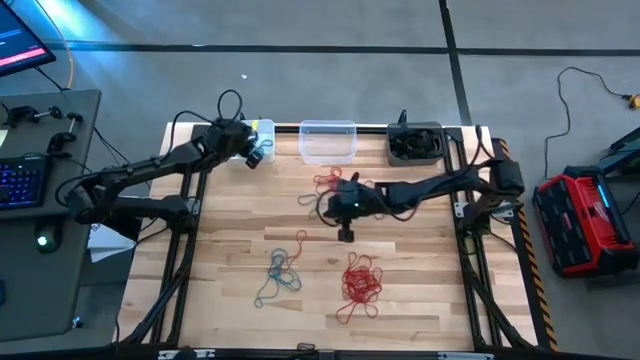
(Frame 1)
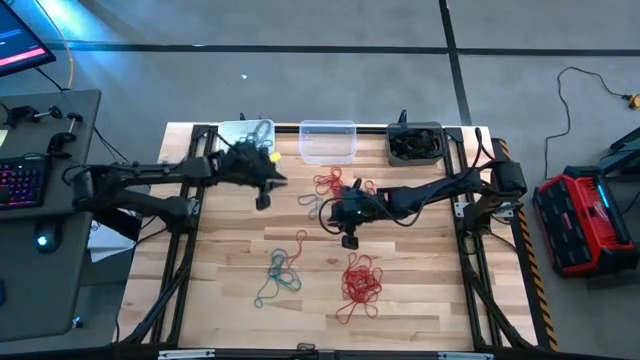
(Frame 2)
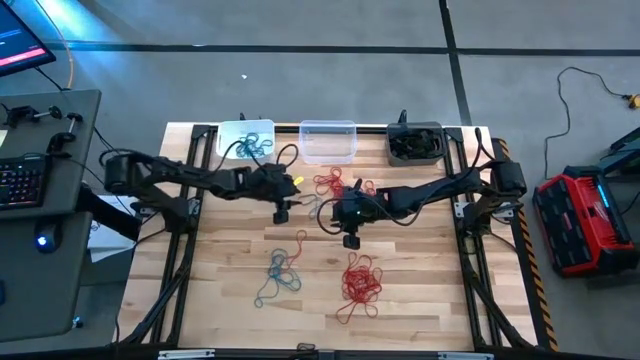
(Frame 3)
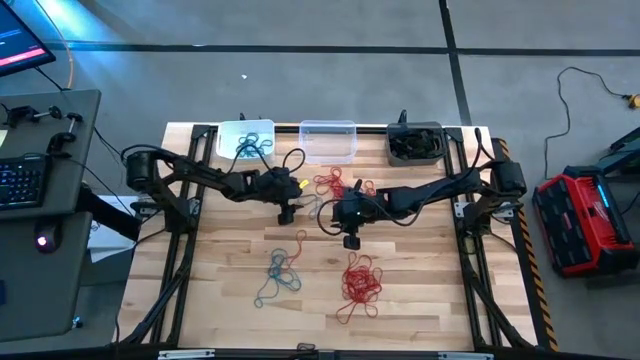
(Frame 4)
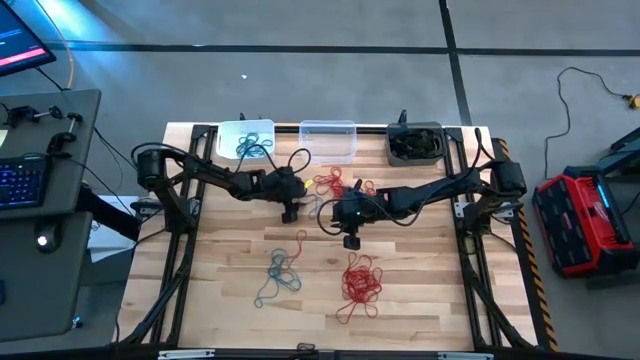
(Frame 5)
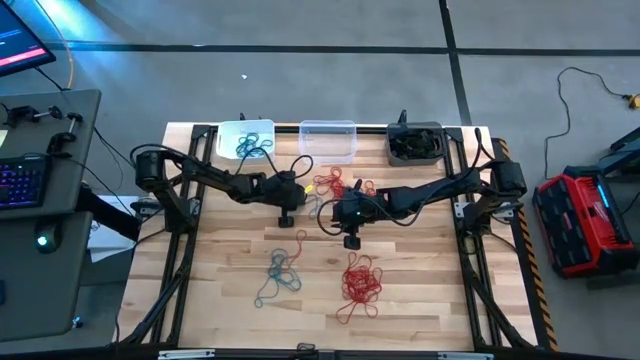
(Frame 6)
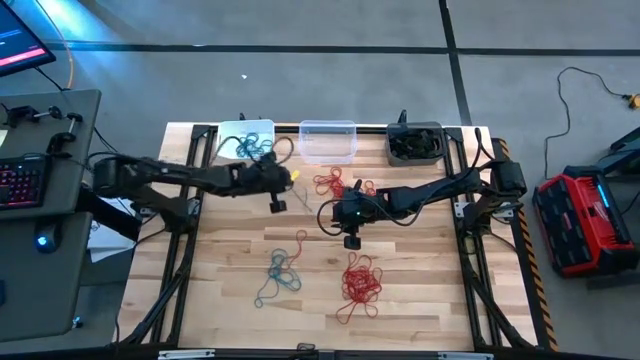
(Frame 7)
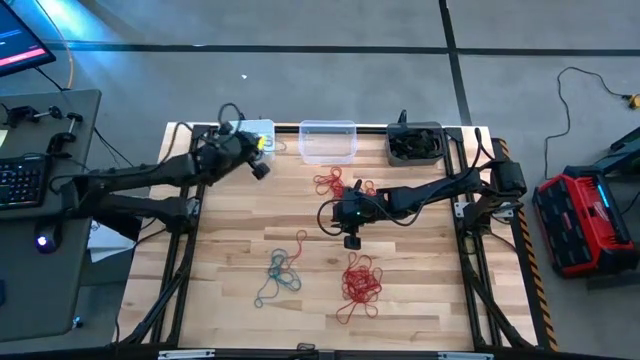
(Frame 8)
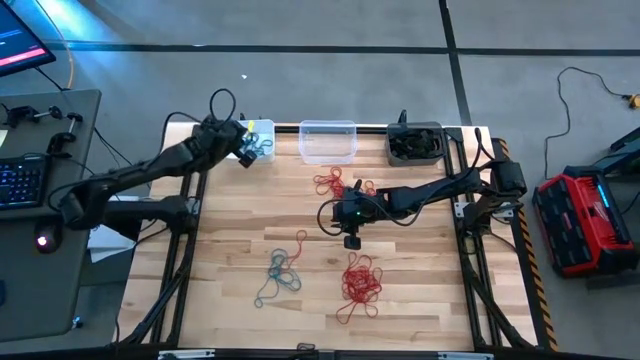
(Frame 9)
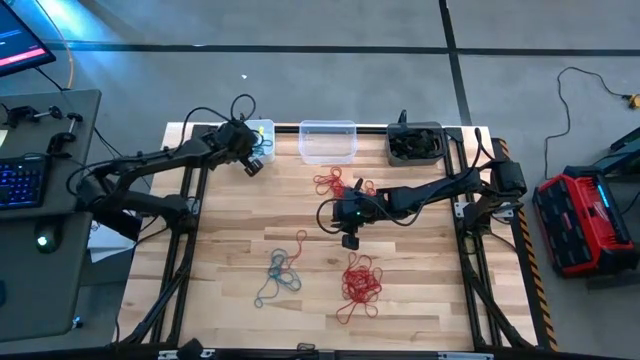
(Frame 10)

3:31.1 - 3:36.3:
Task: Sort rubber bands into baskets
Put the blue rubber band into the white bin

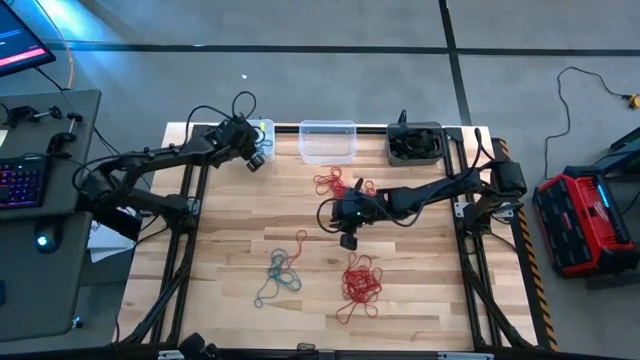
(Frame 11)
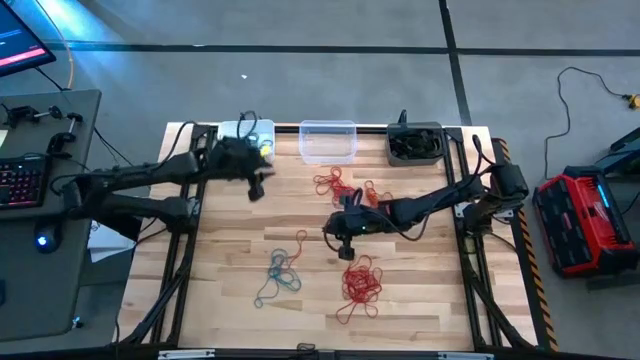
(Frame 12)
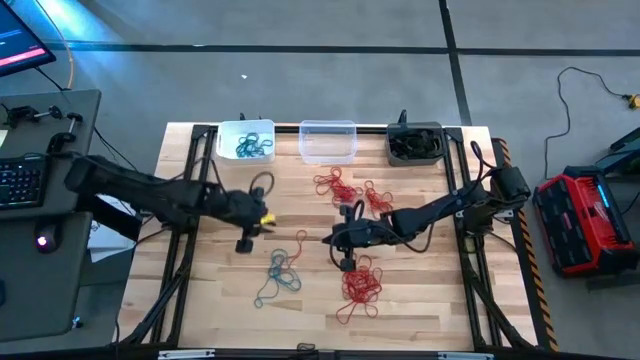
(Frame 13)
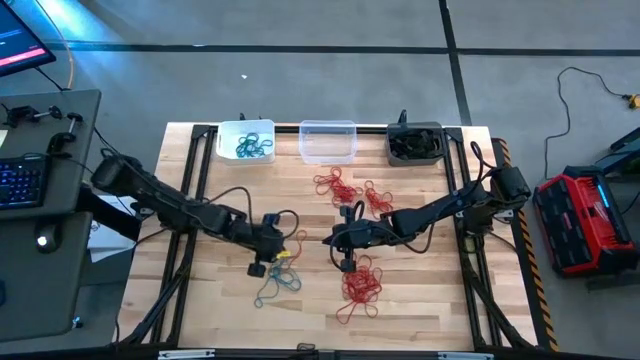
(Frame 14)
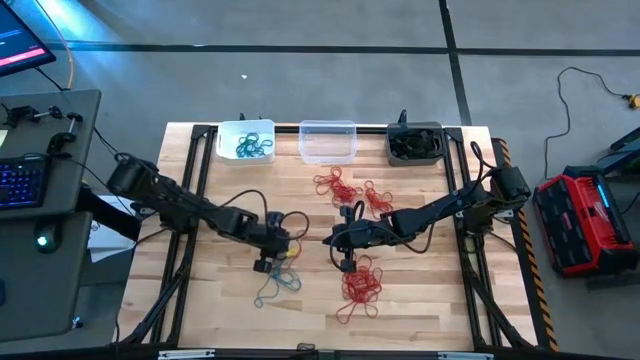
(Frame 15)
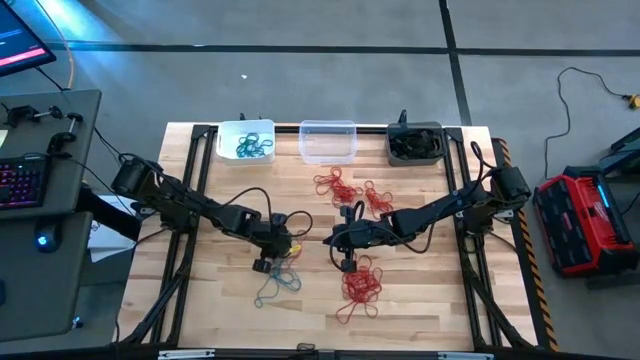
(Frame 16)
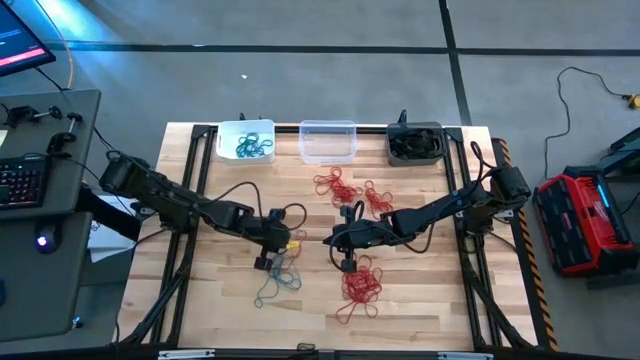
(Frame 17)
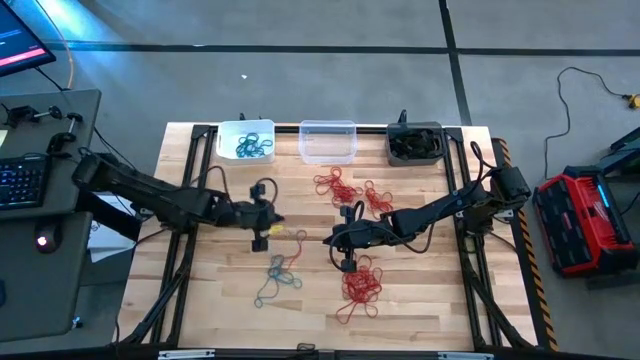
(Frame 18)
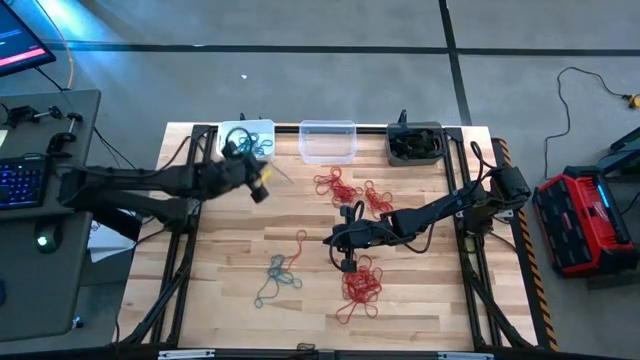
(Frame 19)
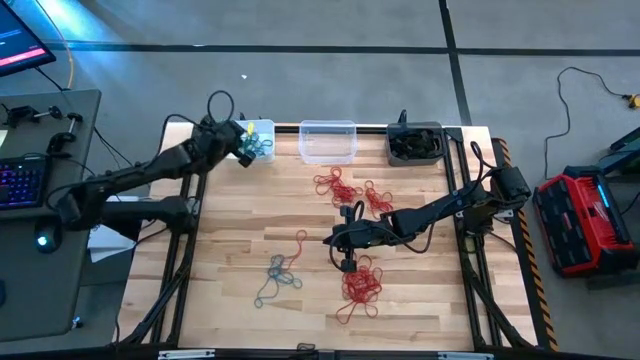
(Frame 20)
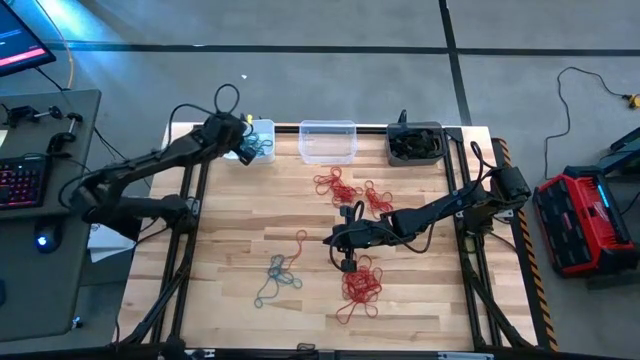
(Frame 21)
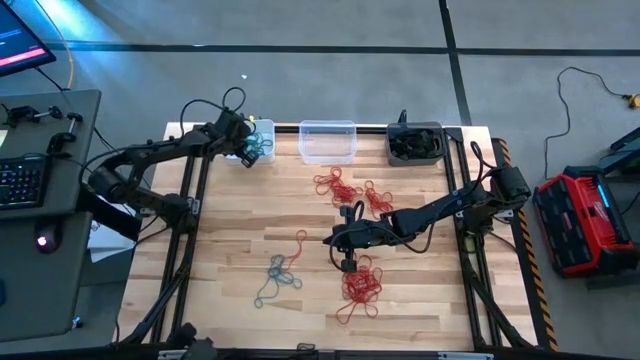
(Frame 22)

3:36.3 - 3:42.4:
Put the blue rubber band into the white bin

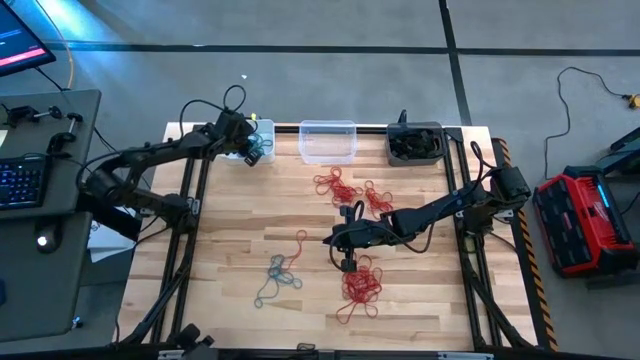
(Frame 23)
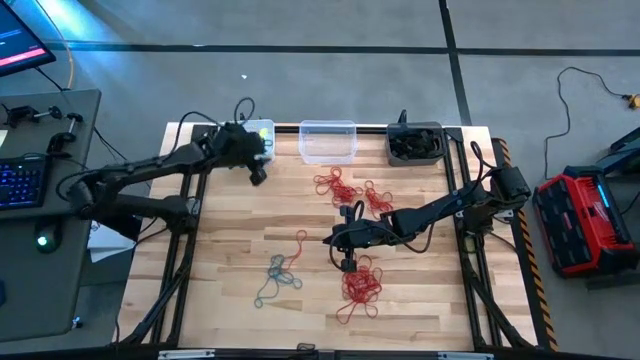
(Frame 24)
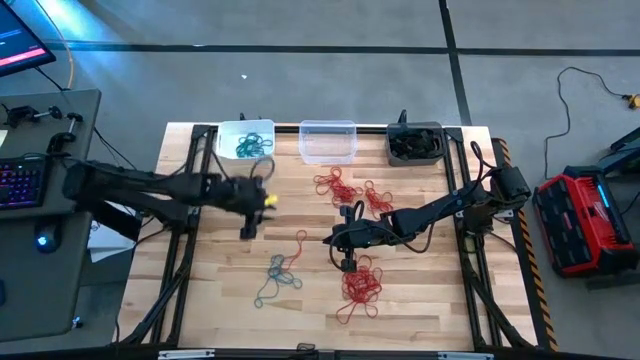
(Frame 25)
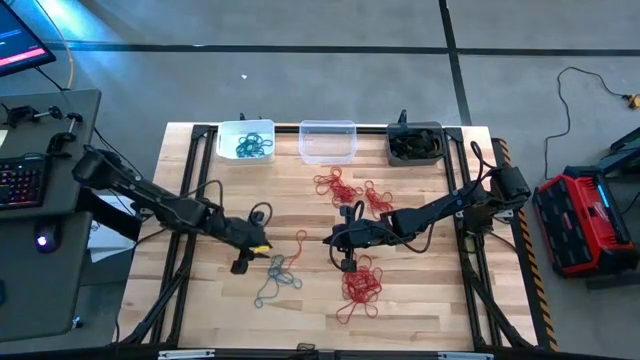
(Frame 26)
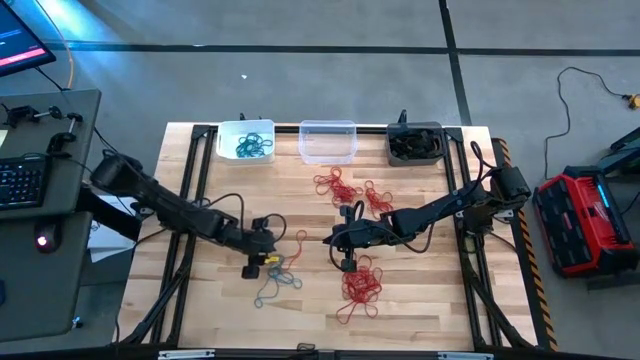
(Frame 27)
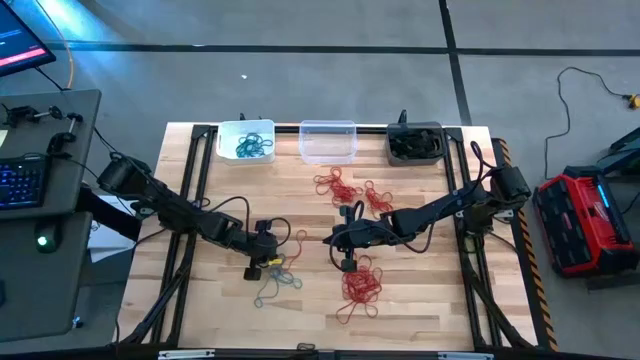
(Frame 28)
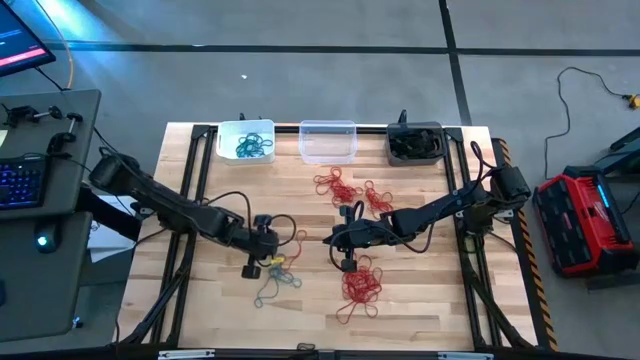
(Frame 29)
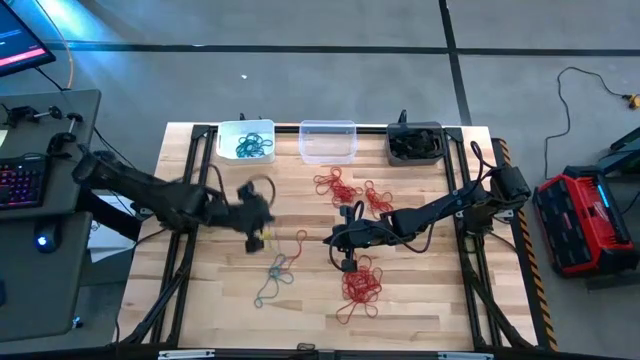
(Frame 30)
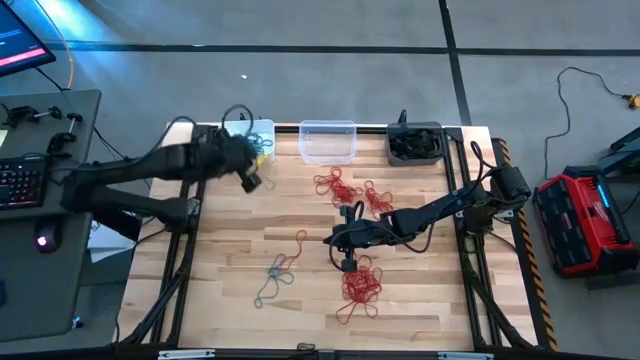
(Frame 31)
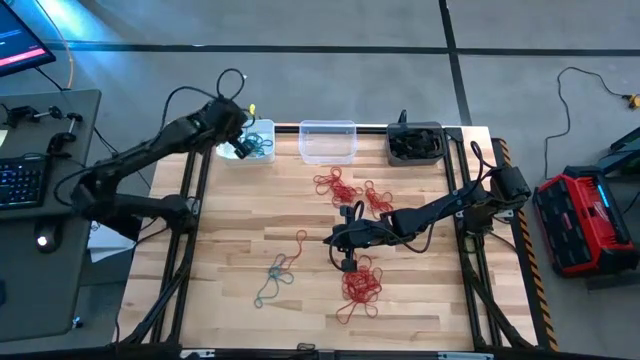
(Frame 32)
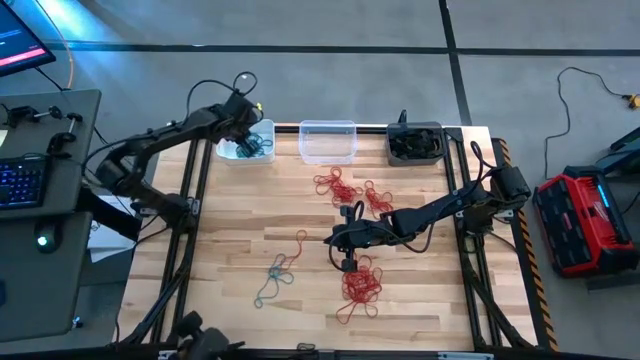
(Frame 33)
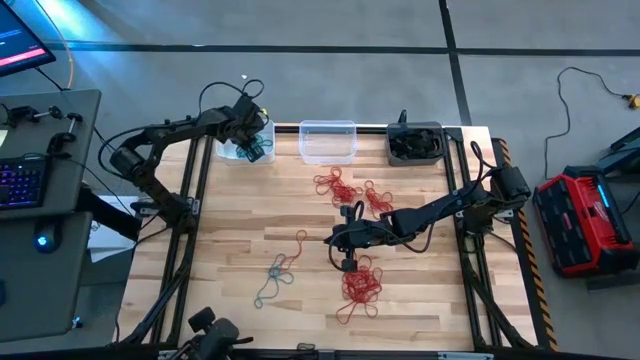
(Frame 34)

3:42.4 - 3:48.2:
Put the blue rubber band into the white bin

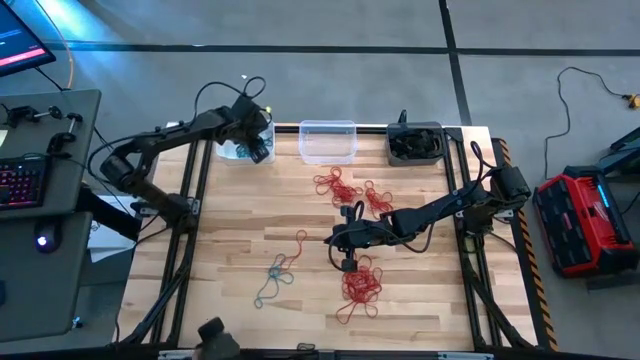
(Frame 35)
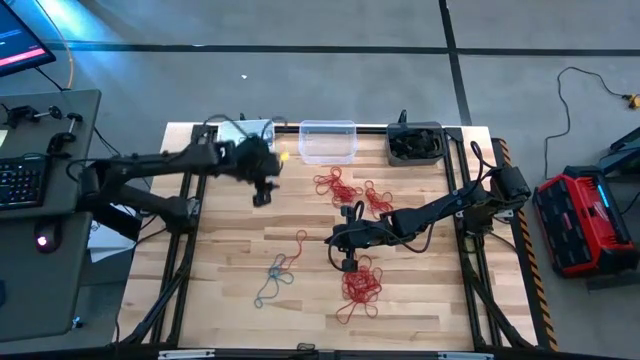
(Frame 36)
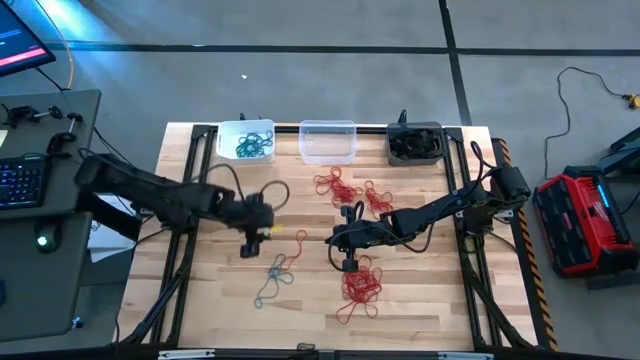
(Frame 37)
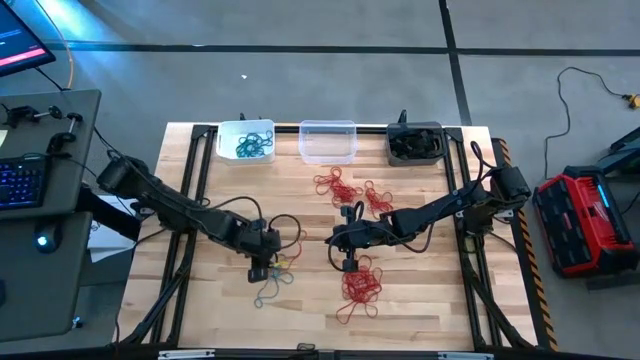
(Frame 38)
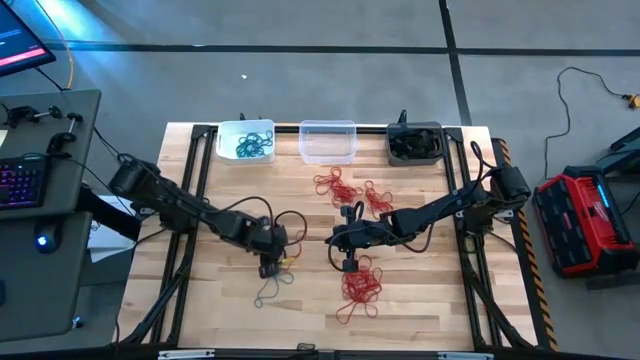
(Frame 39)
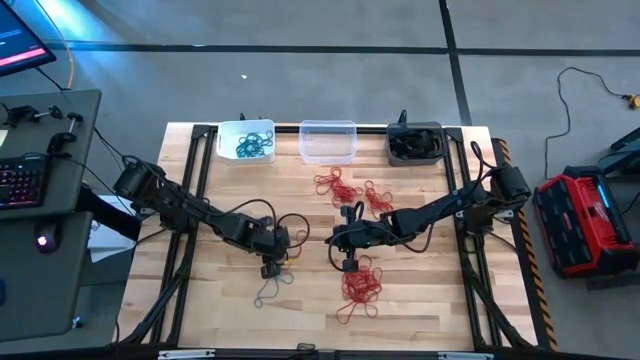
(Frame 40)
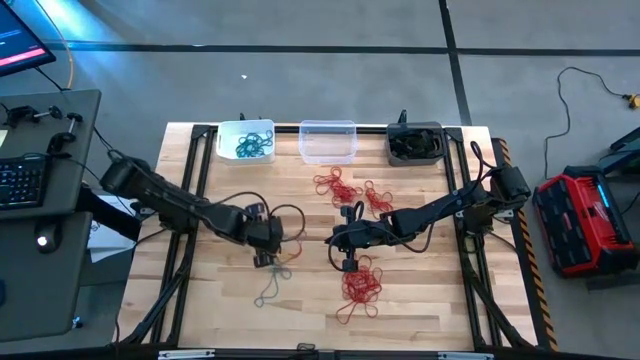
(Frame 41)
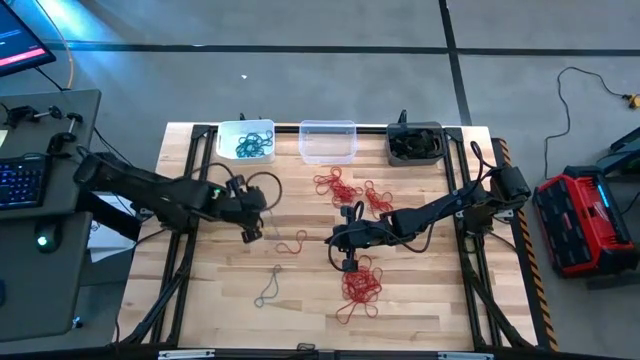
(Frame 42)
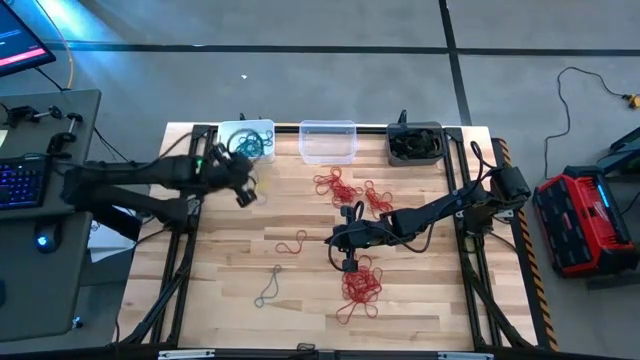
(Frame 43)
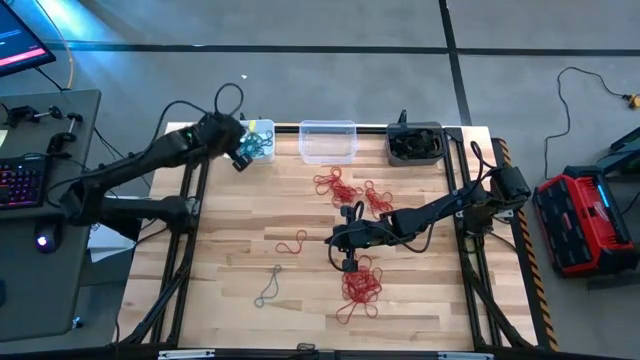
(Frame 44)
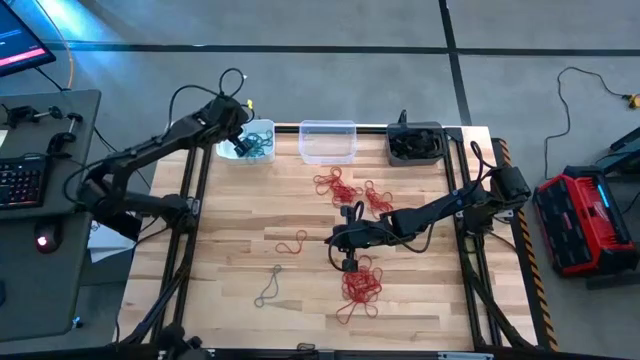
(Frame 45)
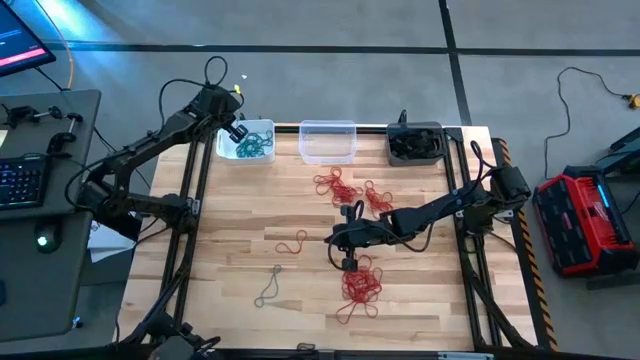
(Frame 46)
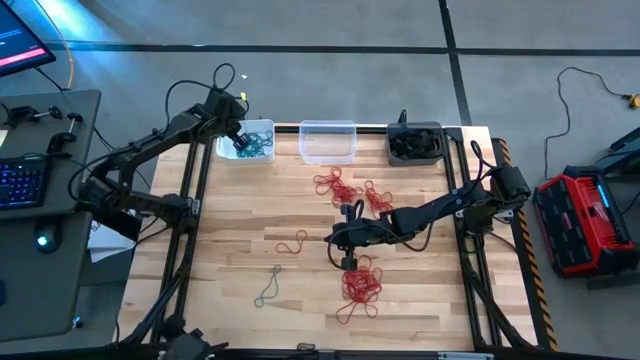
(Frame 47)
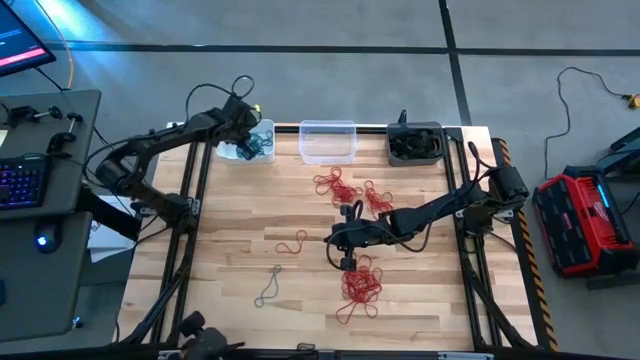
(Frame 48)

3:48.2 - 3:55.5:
Put the blue rubber band into the white bin
